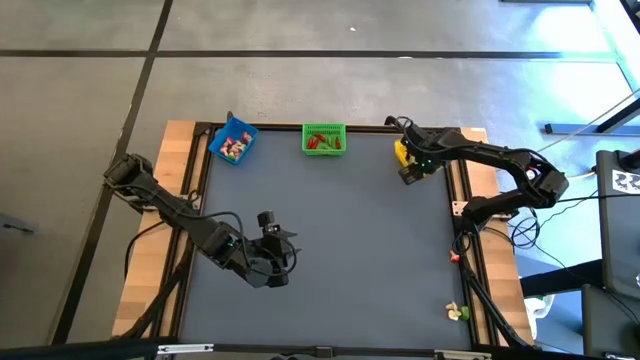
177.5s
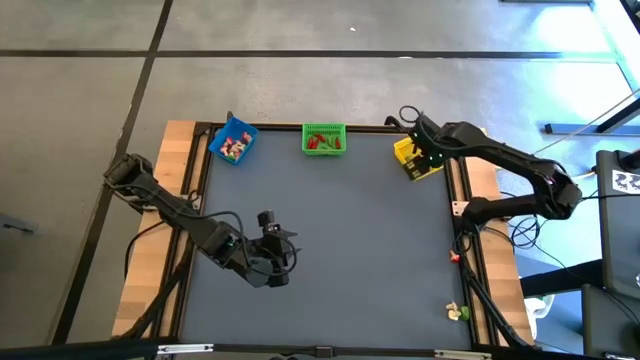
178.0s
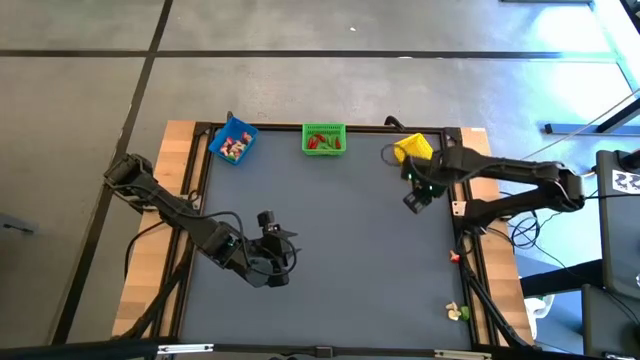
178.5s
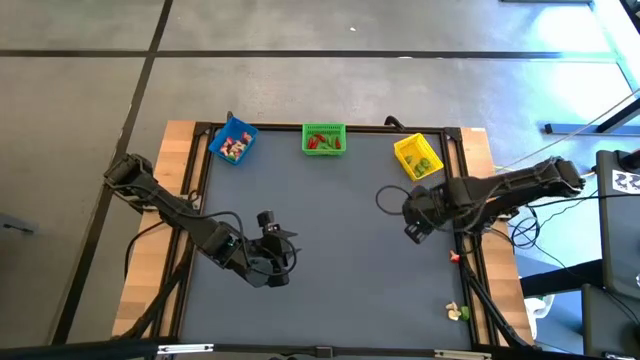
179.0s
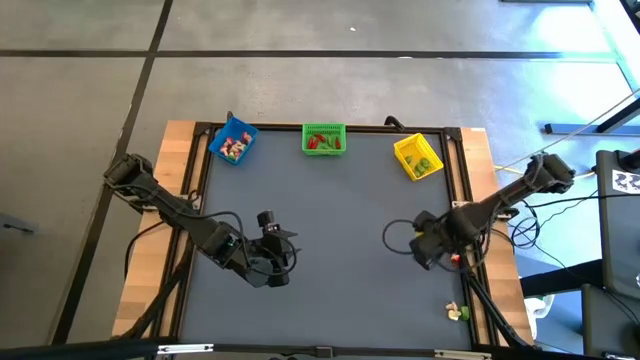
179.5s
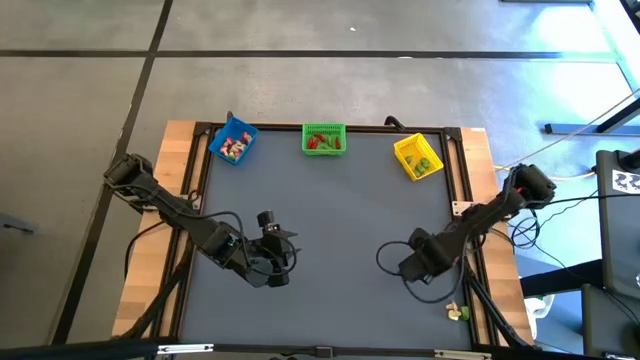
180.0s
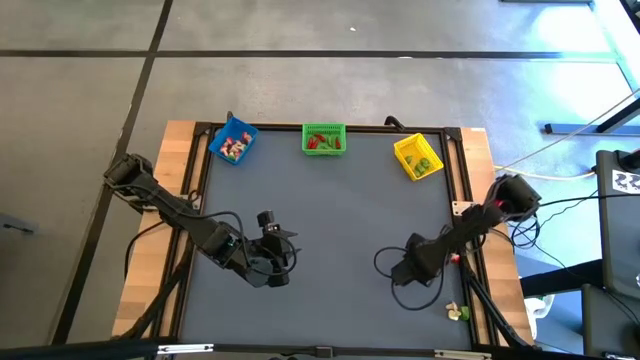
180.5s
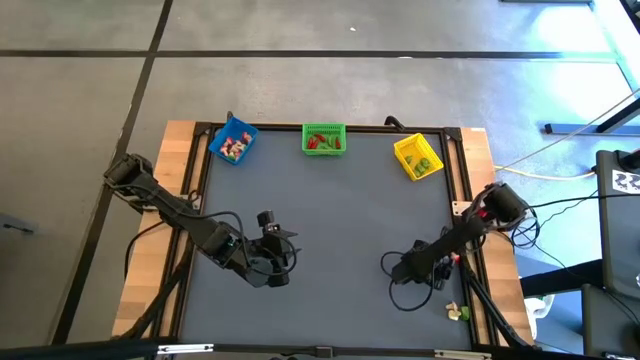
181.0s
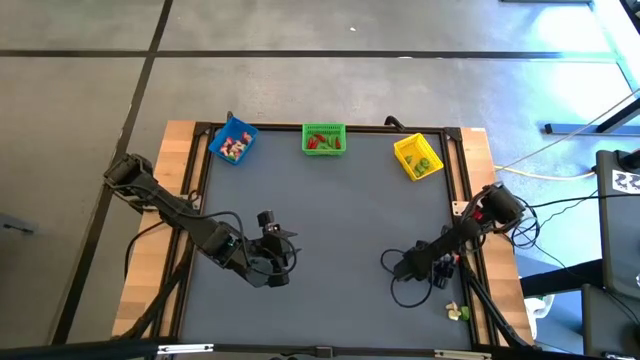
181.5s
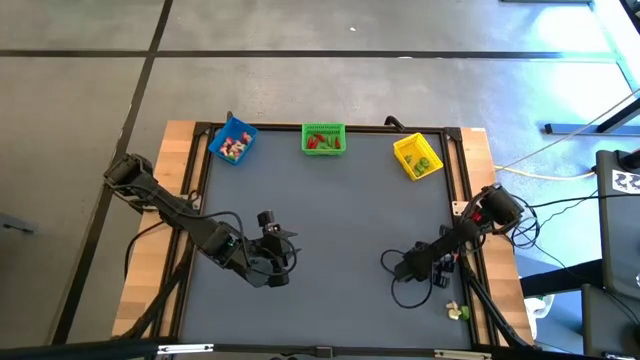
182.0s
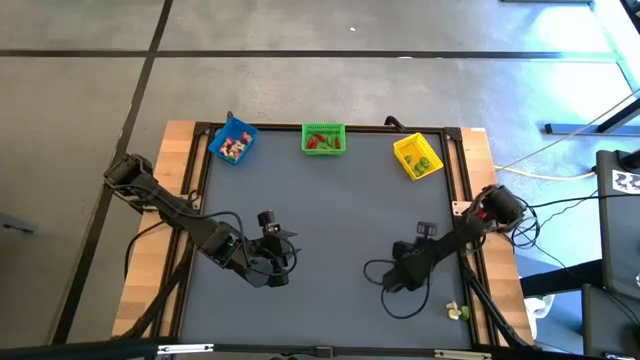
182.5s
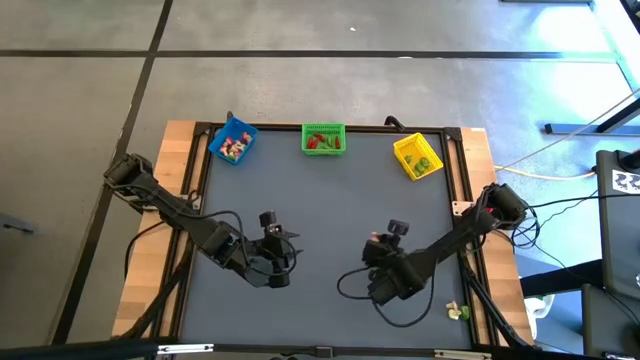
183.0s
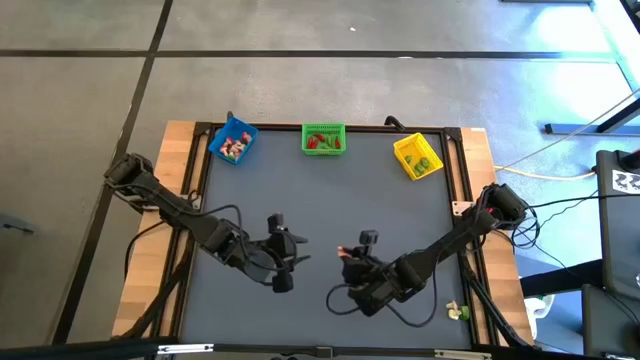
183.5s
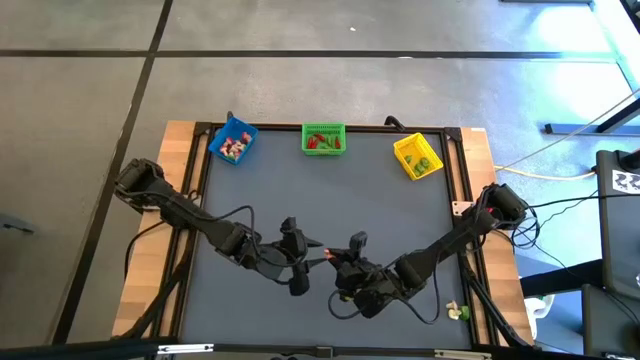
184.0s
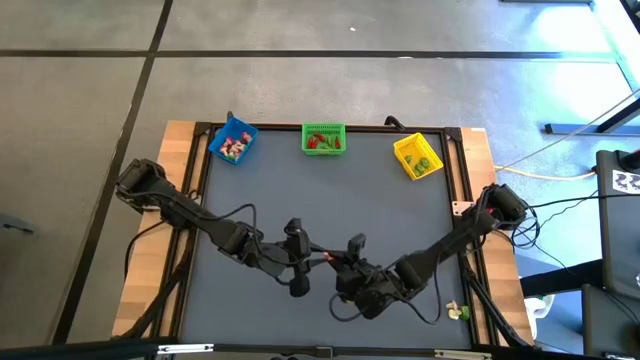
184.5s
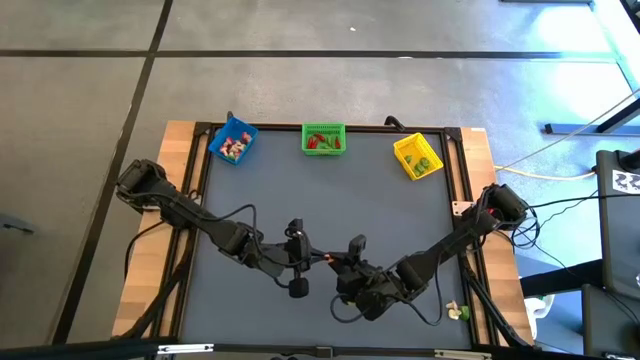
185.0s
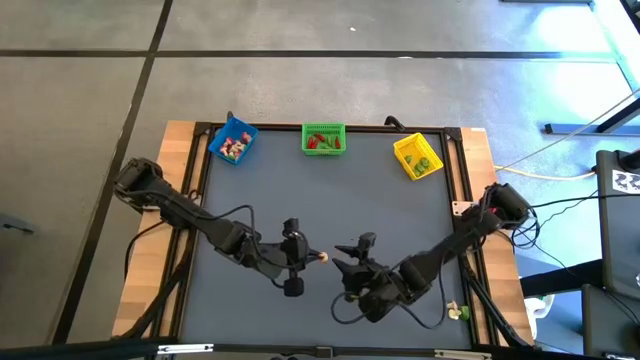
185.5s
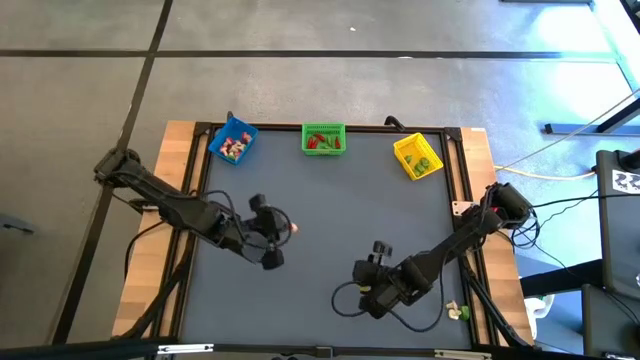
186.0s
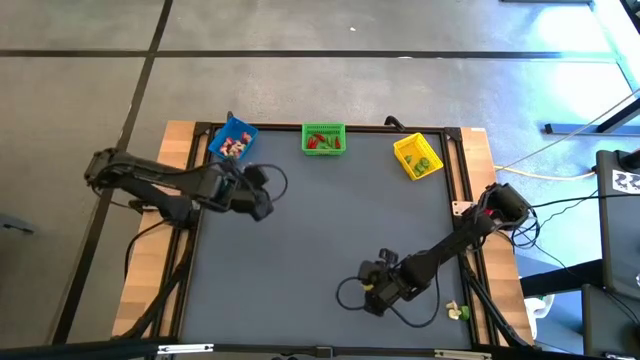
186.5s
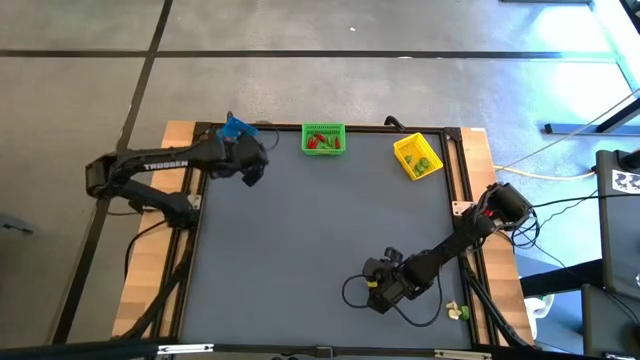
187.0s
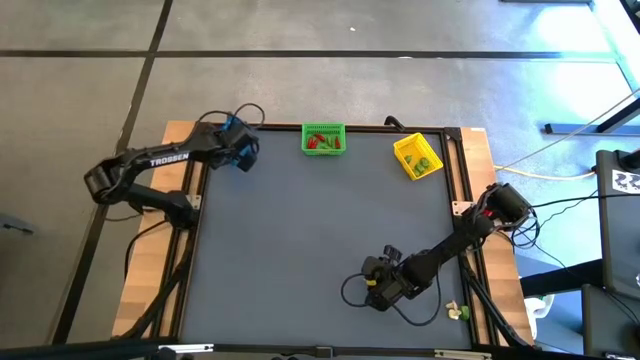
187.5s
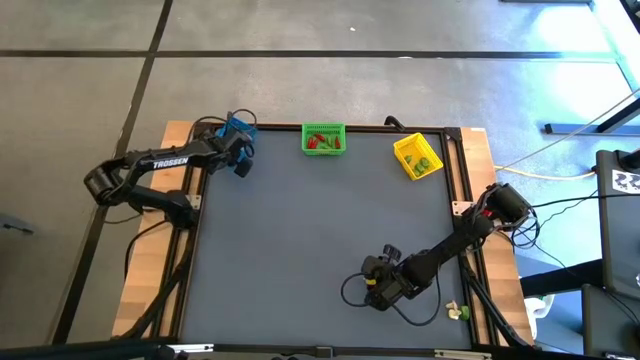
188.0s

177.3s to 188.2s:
Task: Sort produce into baskets
Put the red mushroom into the blue bin

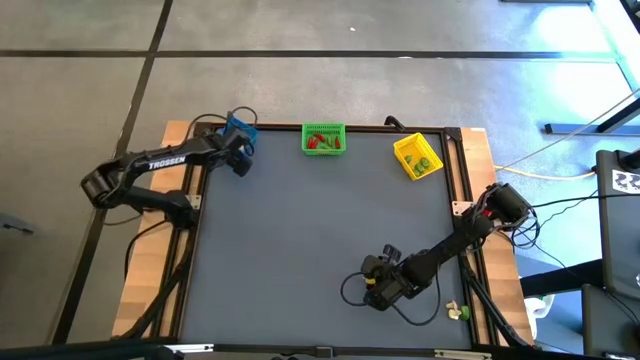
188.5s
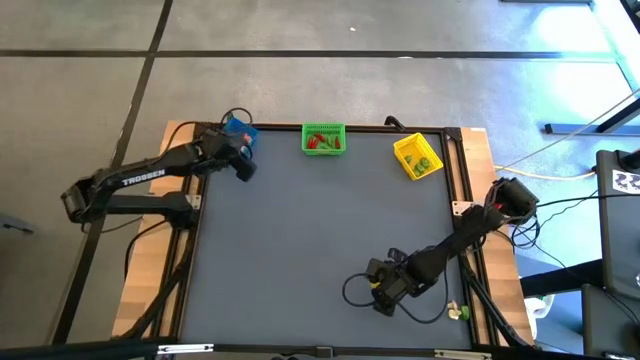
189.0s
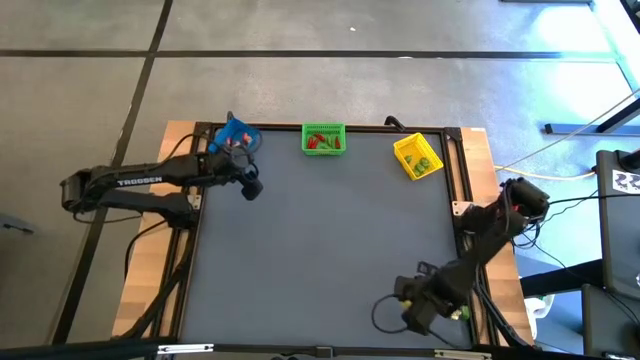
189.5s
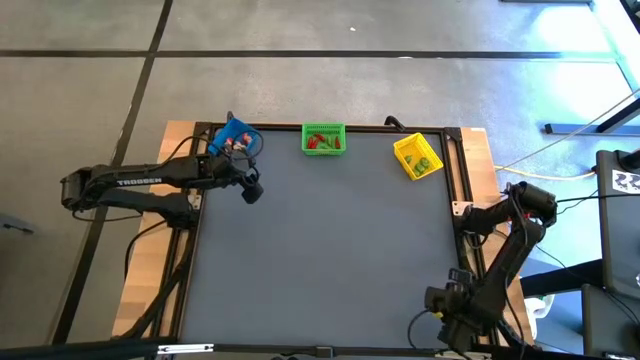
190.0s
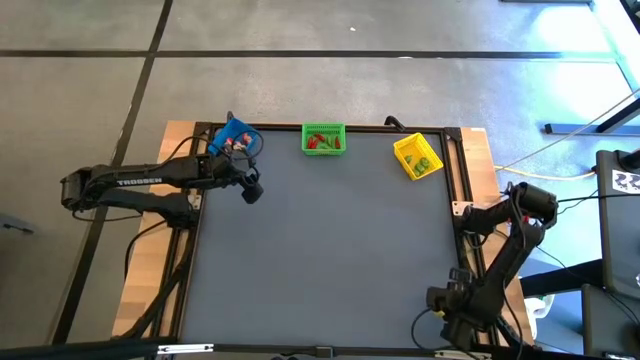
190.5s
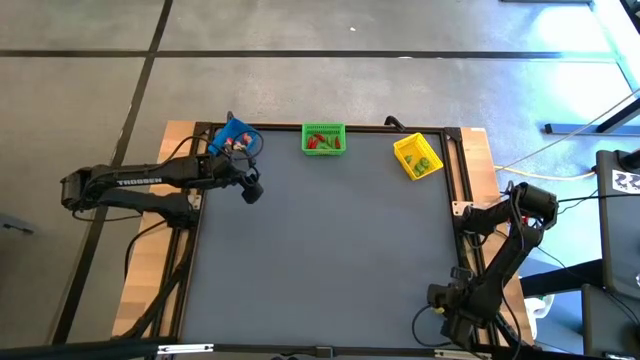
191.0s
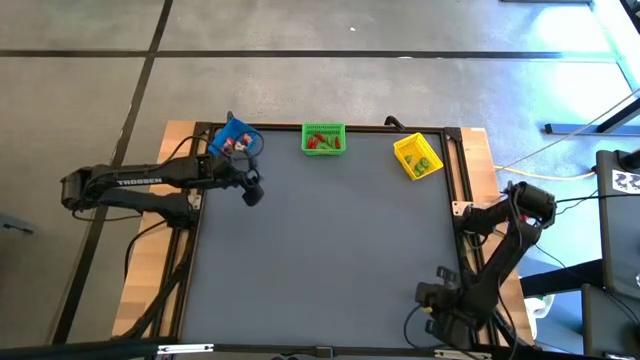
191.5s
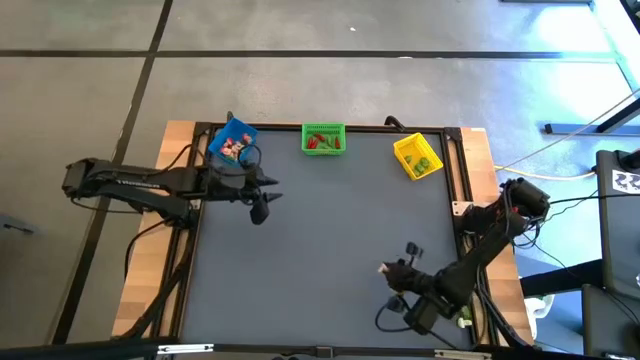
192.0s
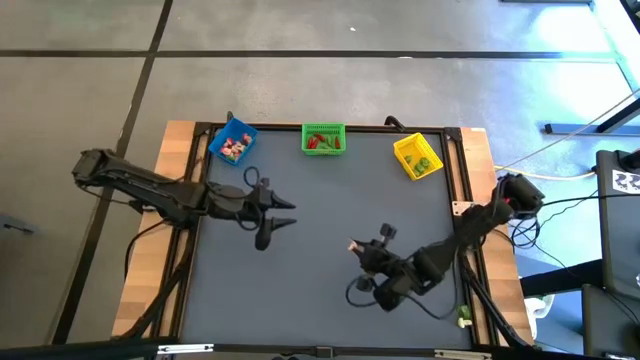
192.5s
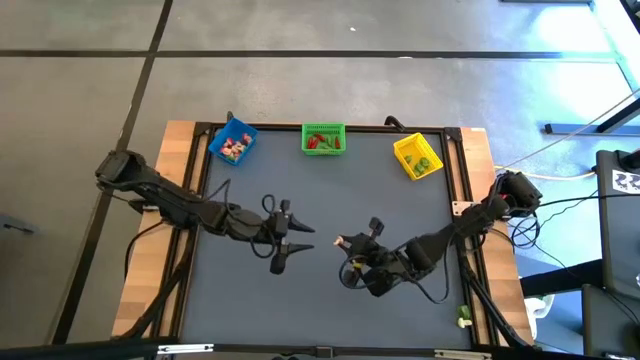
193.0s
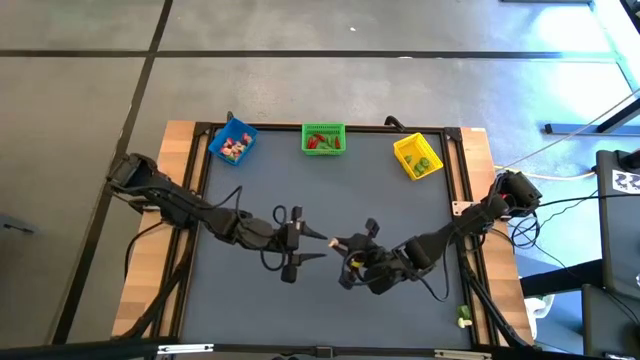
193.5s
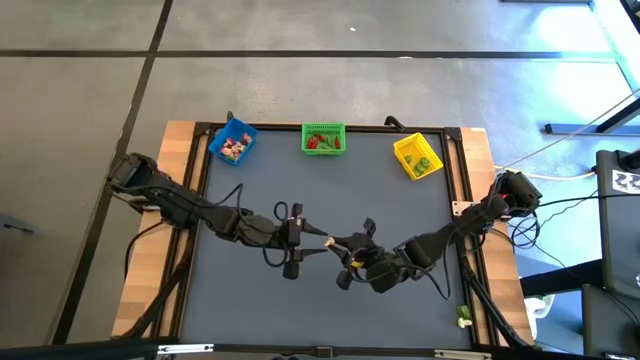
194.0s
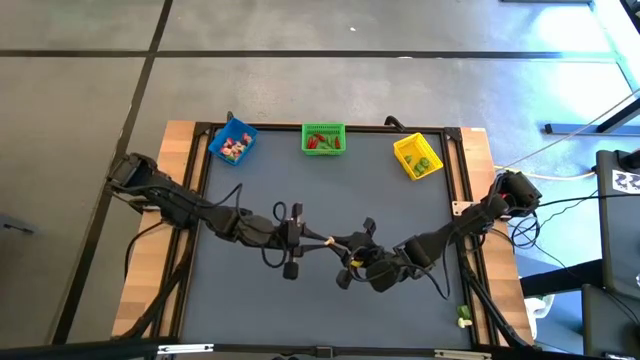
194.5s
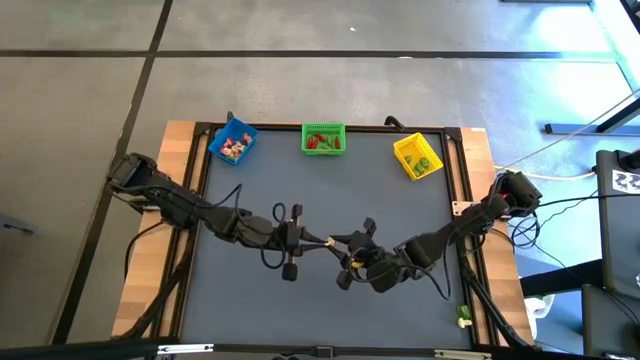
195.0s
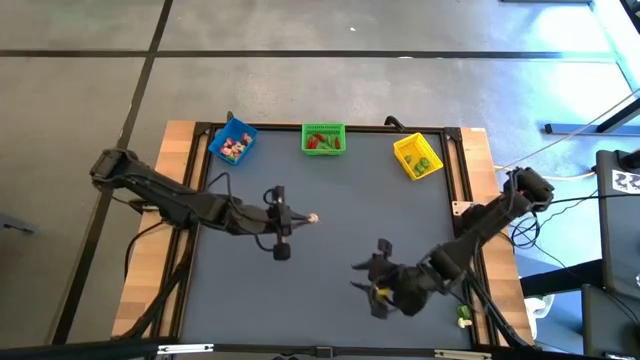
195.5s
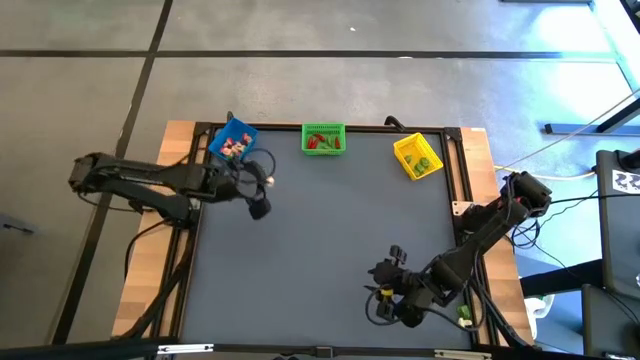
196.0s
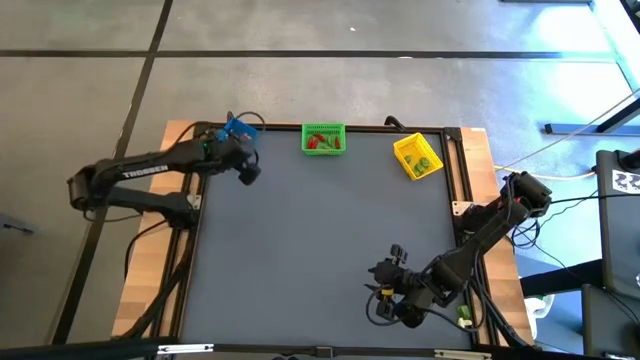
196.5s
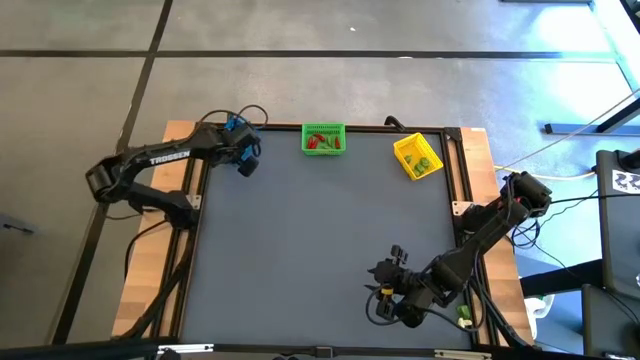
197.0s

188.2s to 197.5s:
Put the brown mushroom into the blue bin
